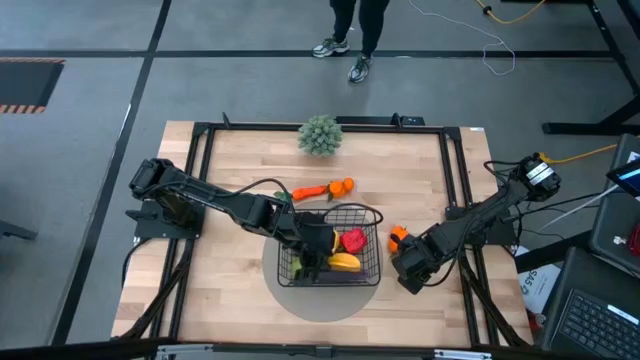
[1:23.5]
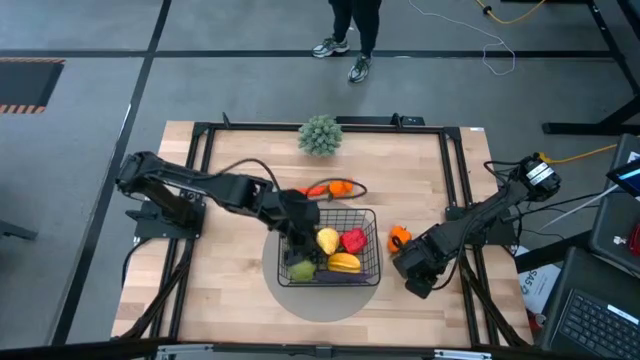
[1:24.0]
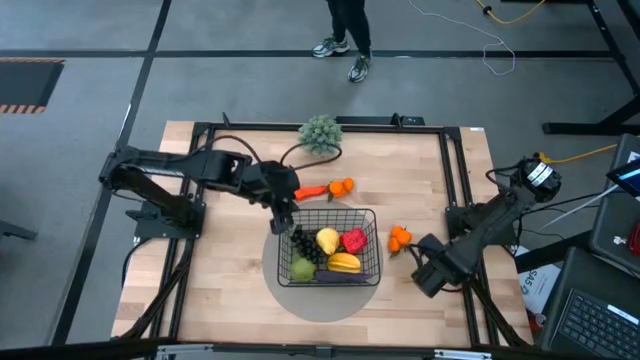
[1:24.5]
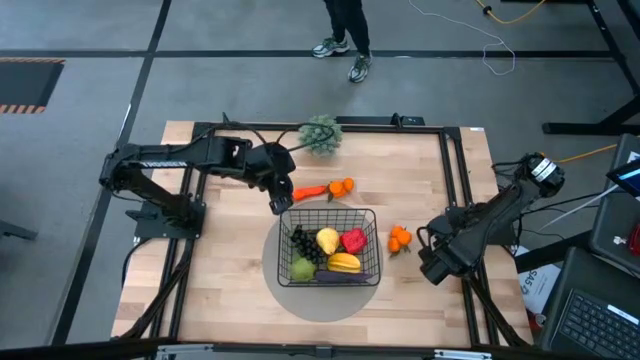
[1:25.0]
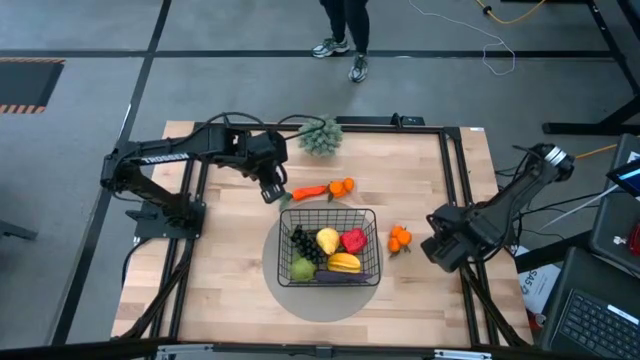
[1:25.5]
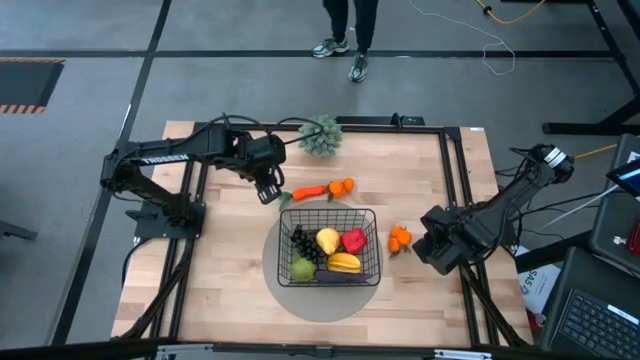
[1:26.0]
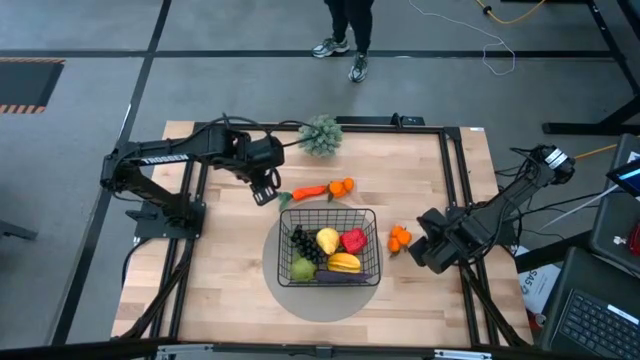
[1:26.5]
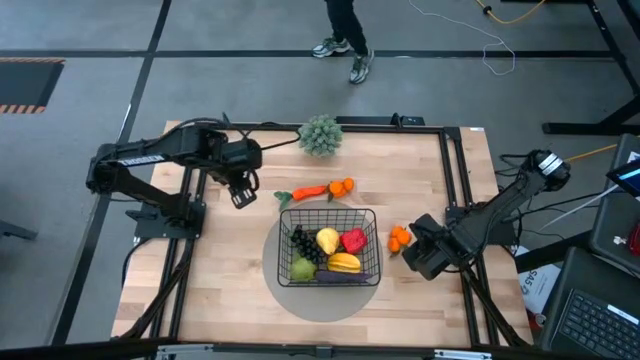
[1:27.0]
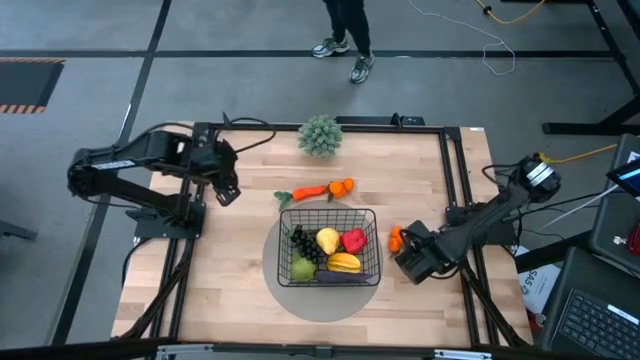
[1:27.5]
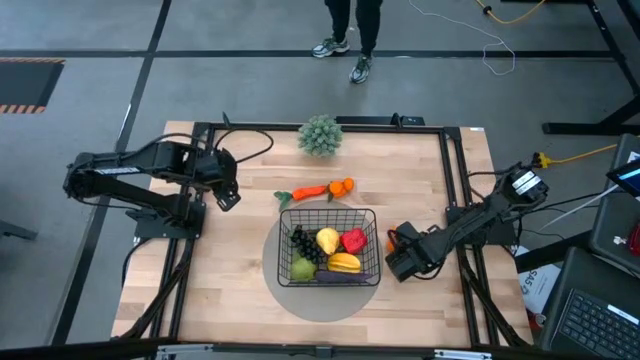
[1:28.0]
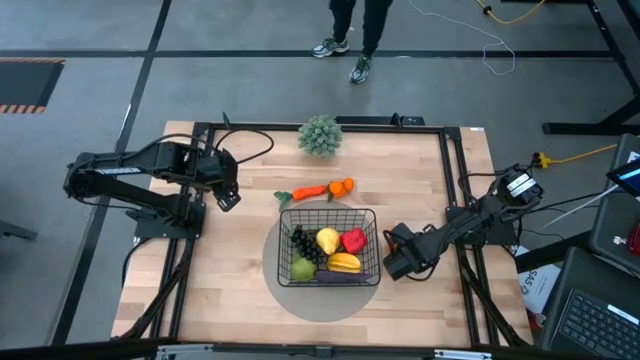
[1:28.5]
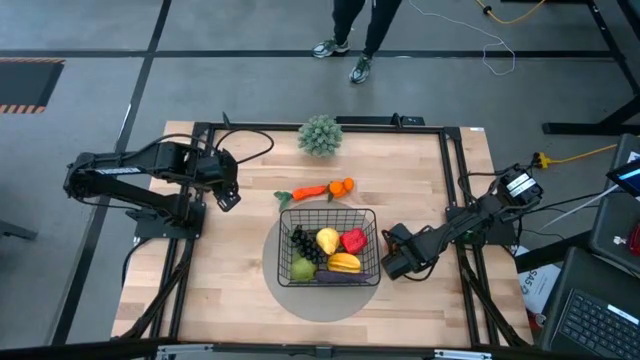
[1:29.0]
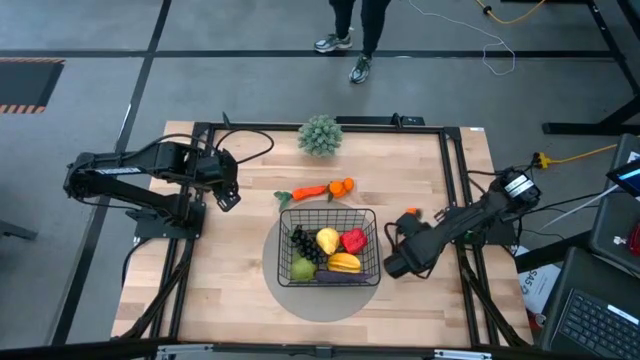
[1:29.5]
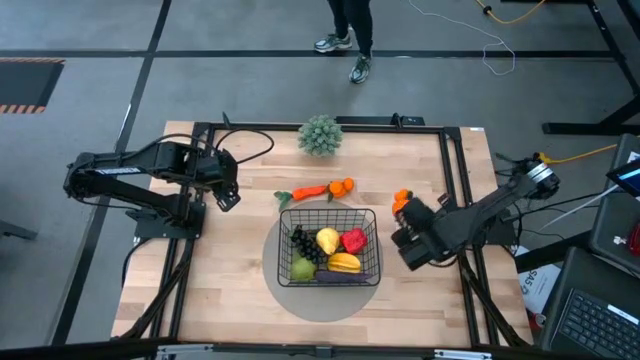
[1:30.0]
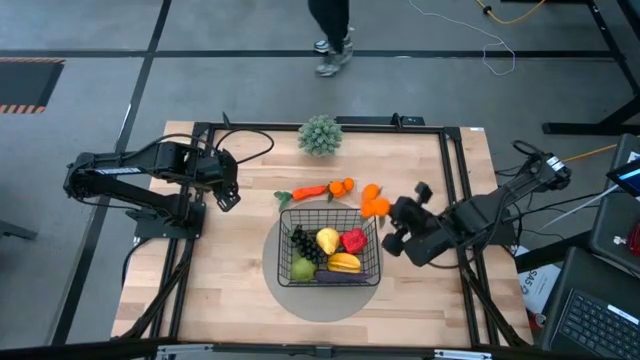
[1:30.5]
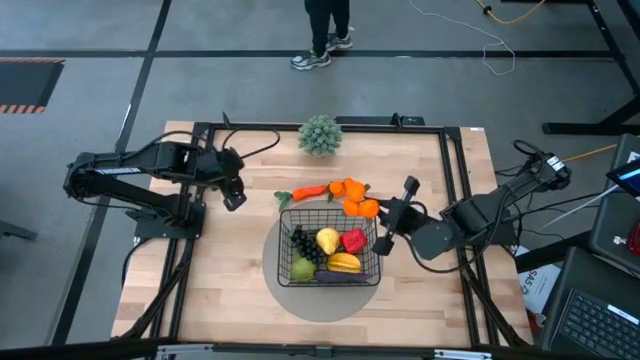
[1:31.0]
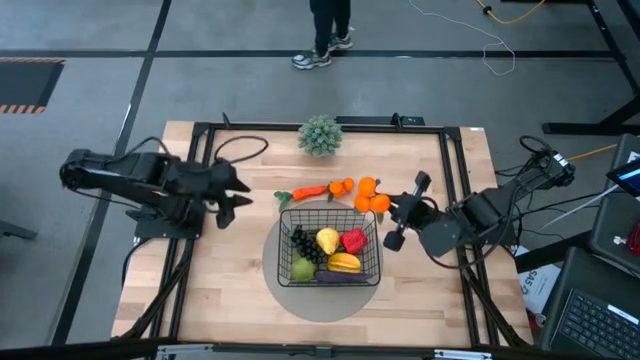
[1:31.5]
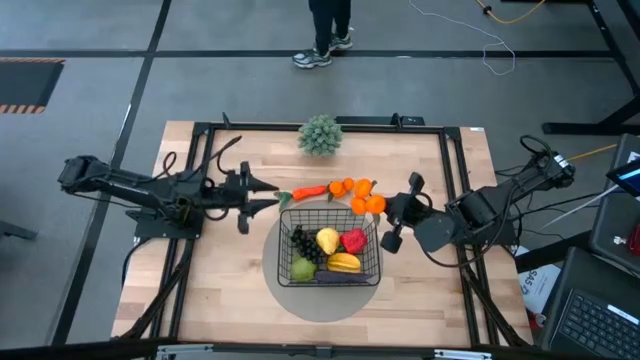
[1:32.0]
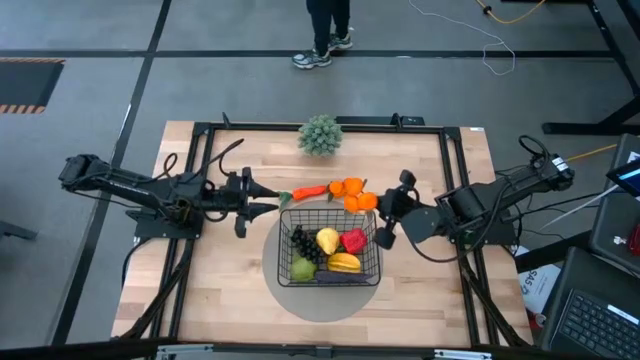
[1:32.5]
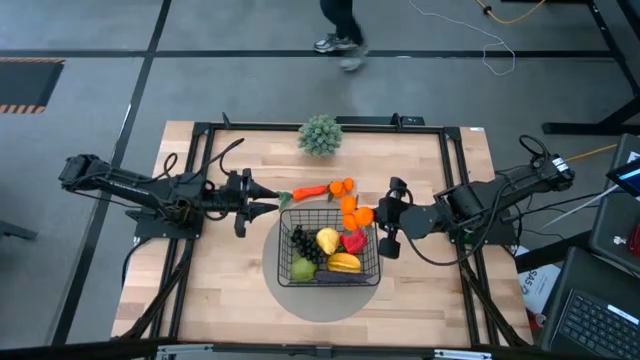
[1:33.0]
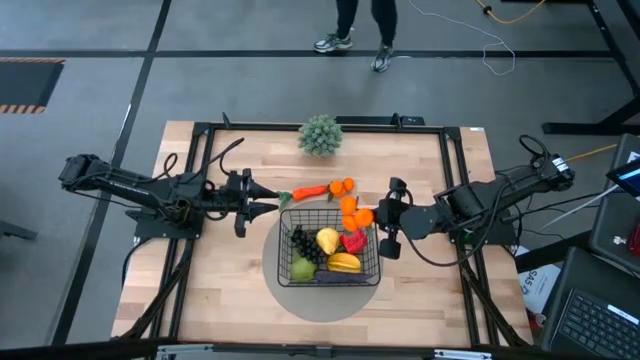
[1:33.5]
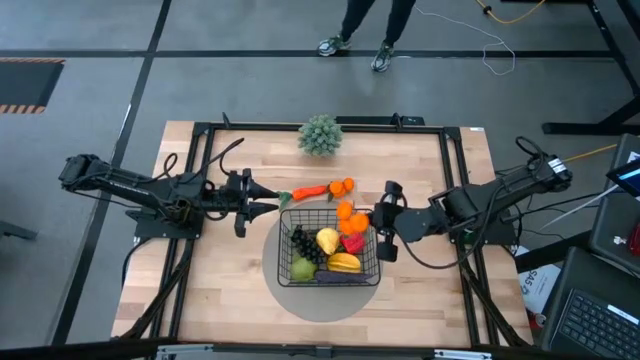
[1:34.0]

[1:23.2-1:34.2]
Task: Build produce basket
Put the bottom tangerine into the black wire basket

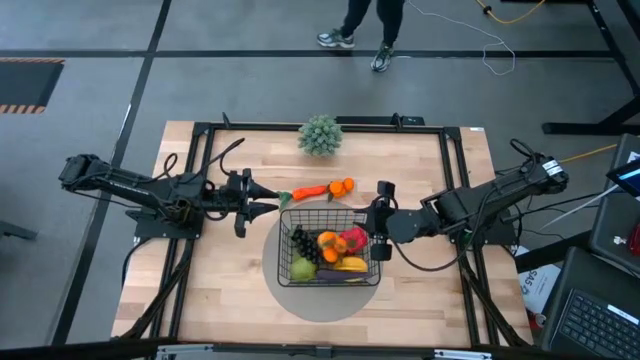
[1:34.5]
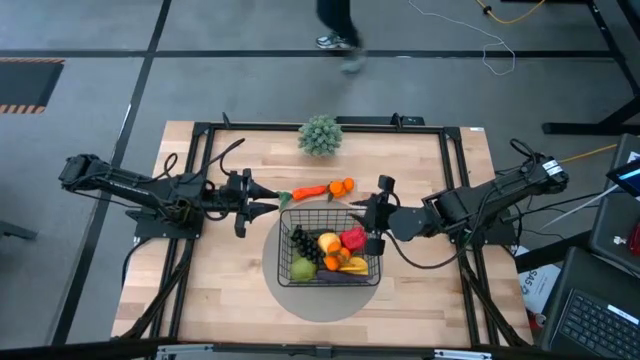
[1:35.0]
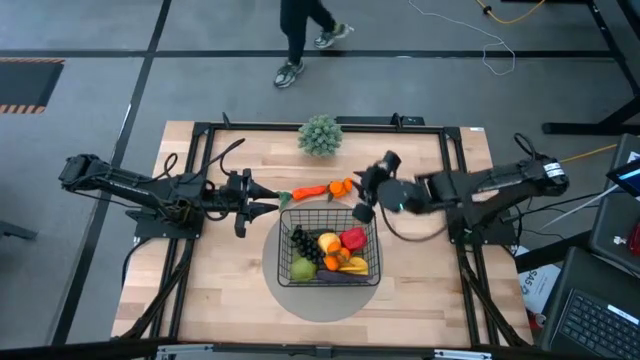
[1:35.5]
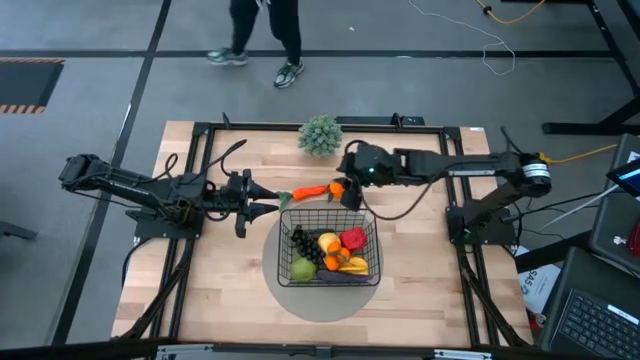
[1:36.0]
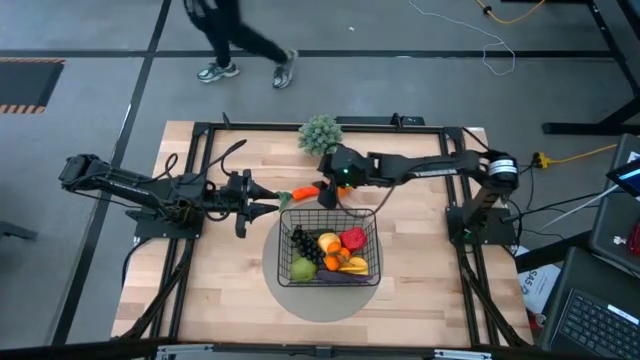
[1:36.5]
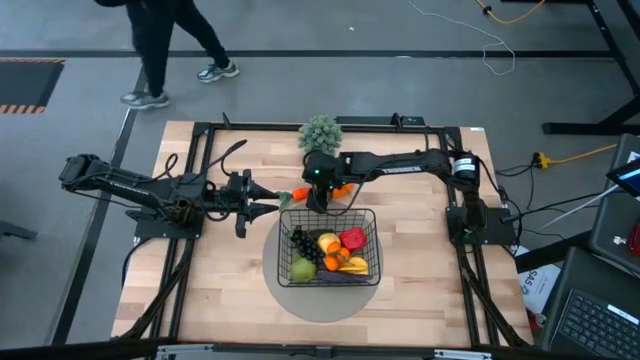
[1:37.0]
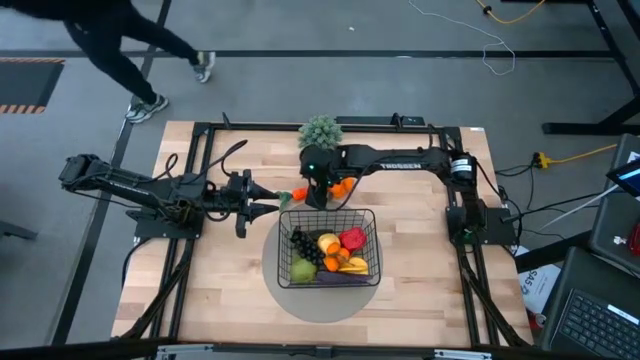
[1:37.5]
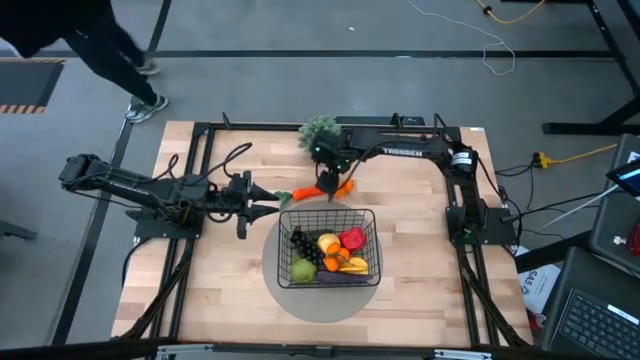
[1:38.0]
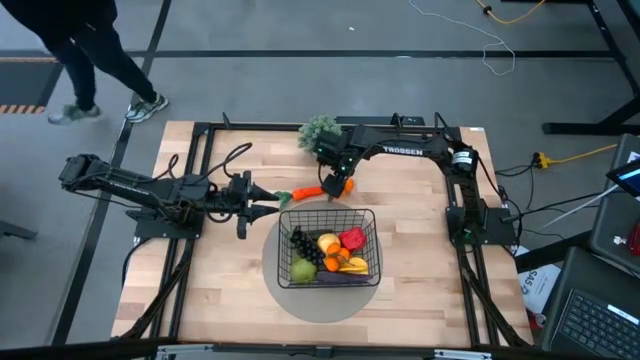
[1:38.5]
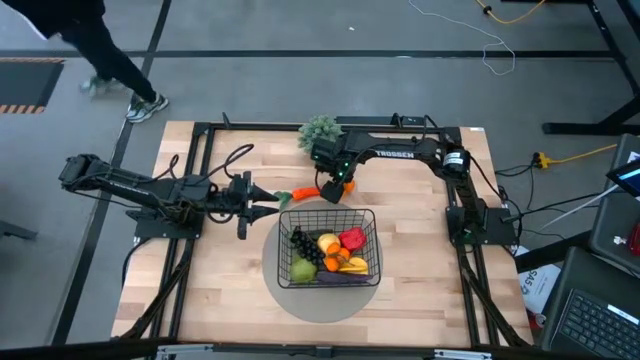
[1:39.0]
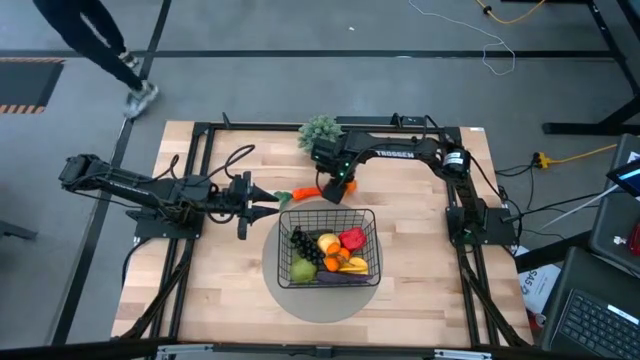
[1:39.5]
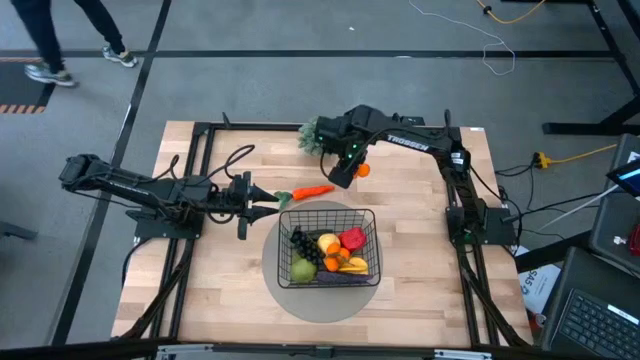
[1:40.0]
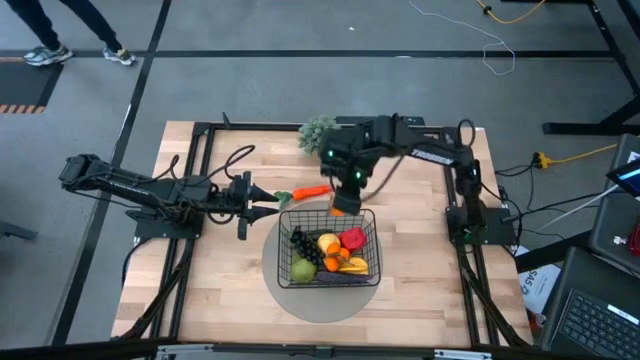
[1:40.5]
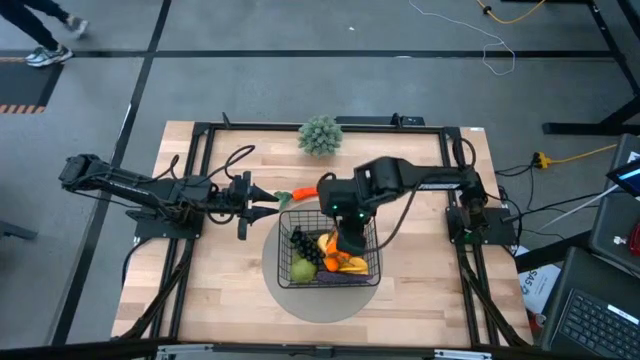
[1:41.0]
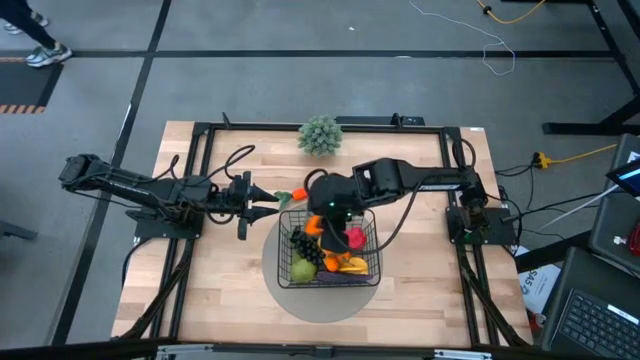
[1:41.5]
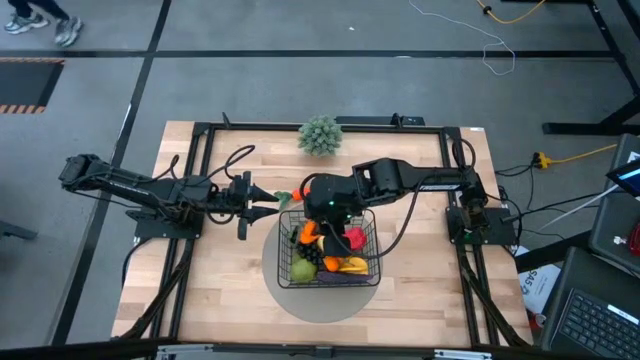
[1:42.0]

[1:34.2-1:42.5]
Put the tangerine into the black wire basket

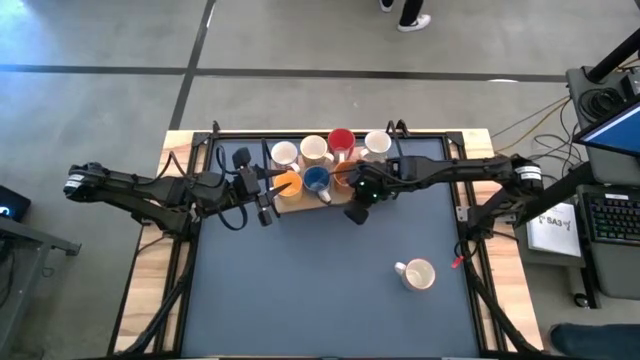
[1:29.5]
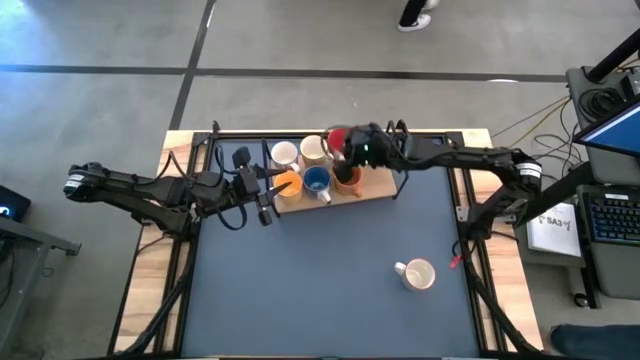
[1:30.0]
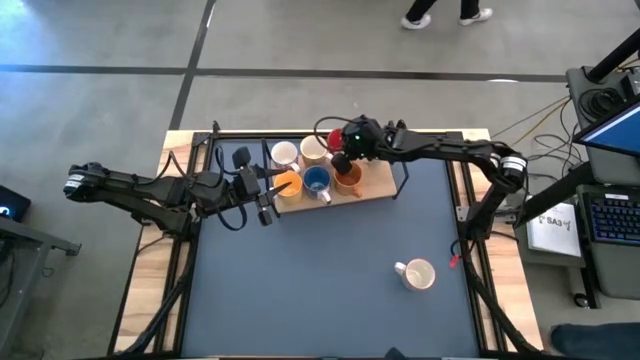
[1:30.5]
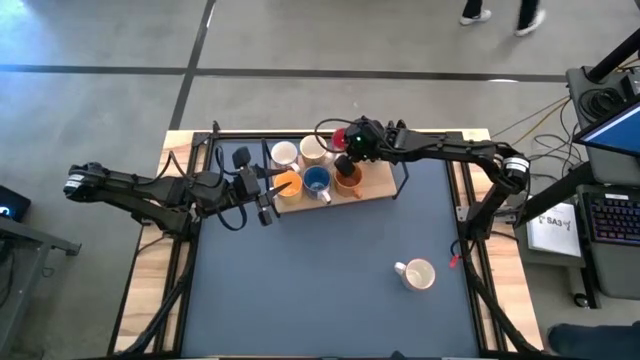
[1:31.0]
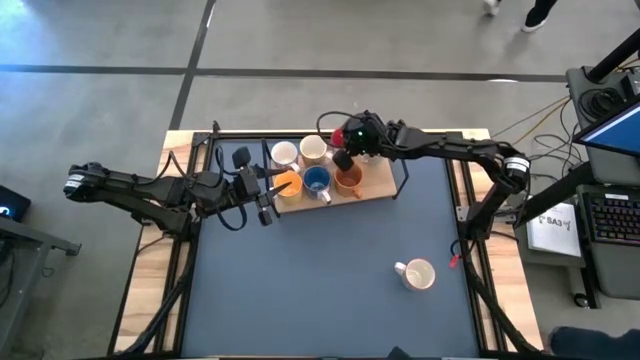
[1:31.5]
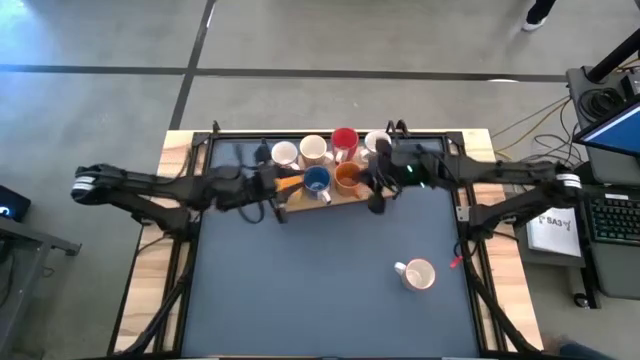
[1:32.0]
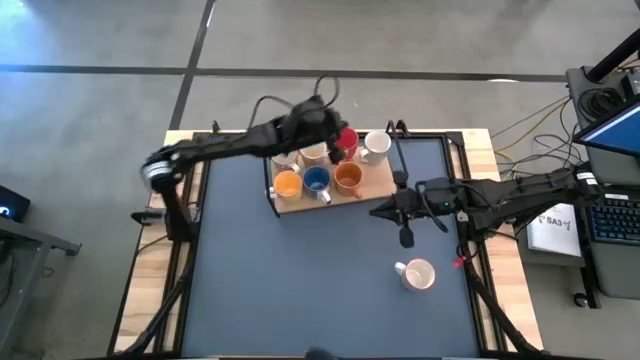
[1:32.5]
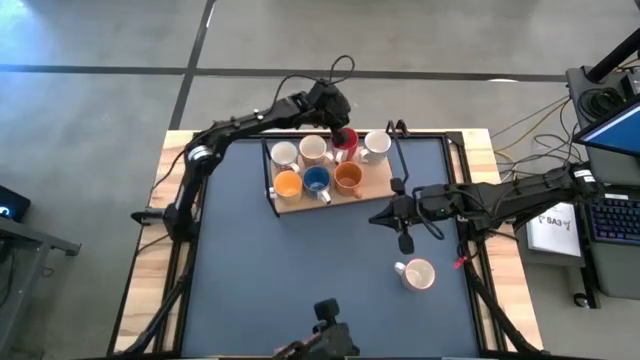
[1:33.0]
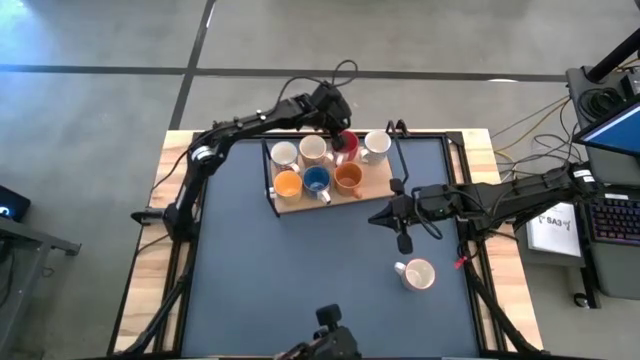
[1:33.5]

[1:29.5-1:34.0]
Task: Place coffee mugs
Adjust the red mug on the shelf
